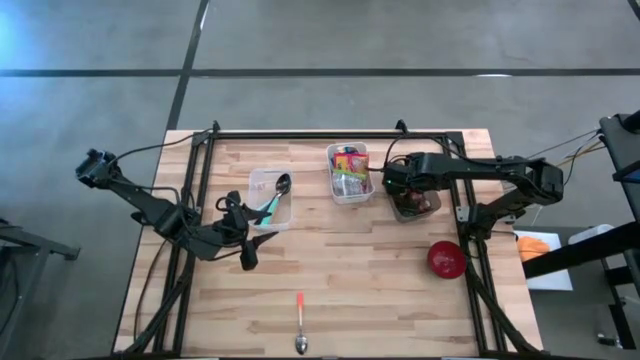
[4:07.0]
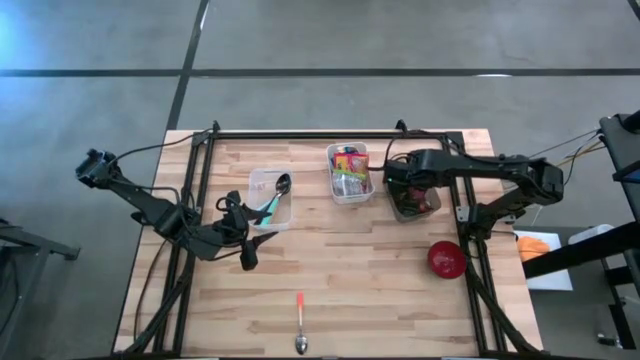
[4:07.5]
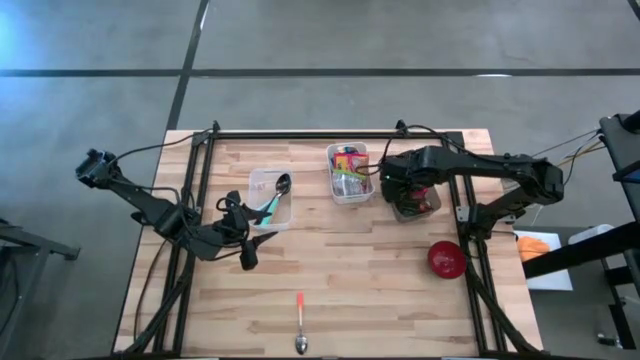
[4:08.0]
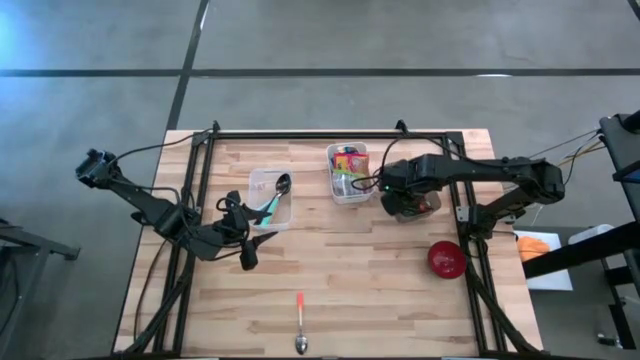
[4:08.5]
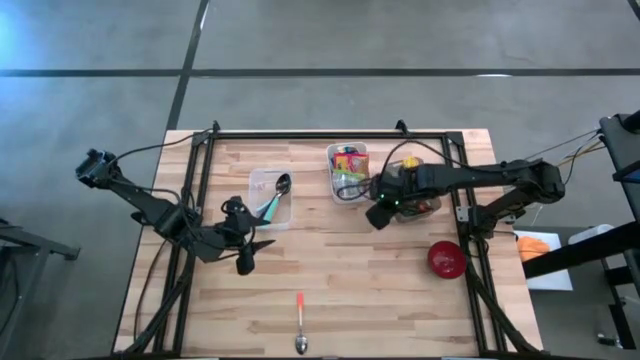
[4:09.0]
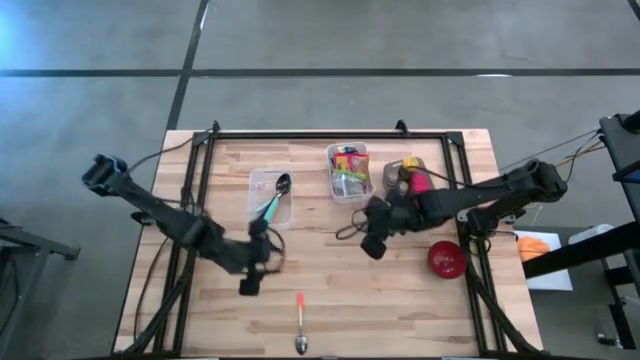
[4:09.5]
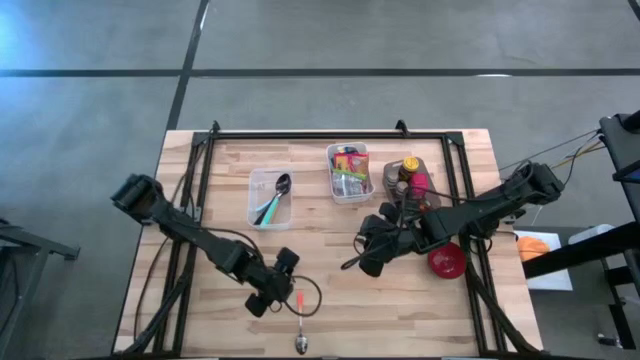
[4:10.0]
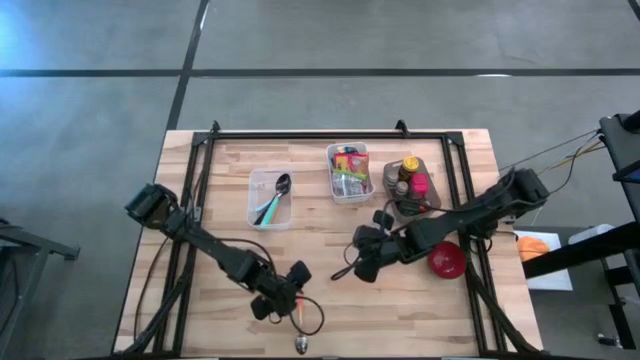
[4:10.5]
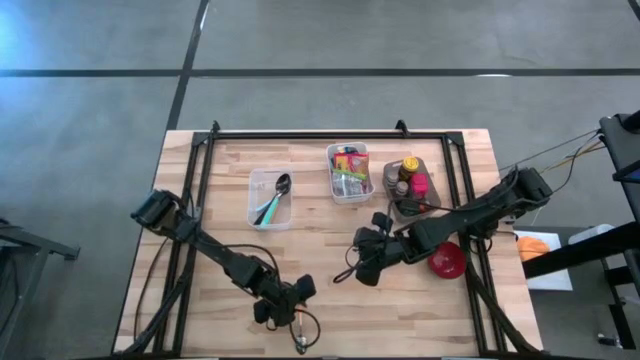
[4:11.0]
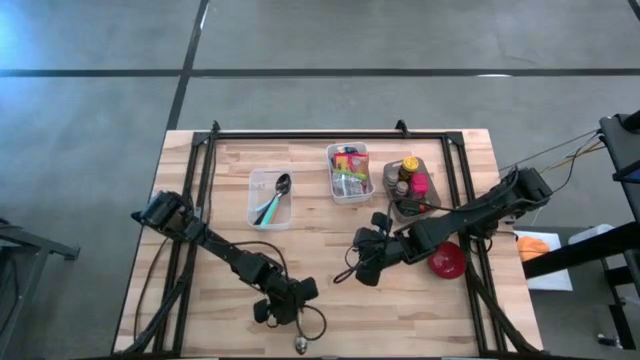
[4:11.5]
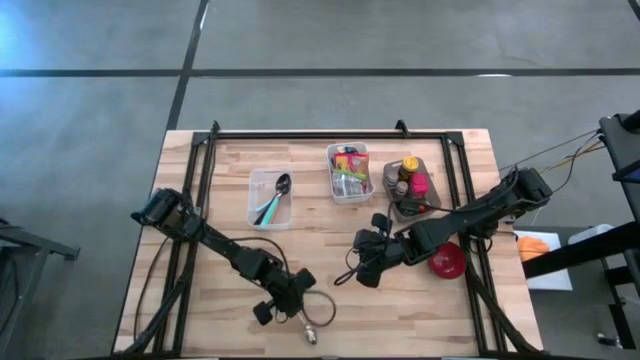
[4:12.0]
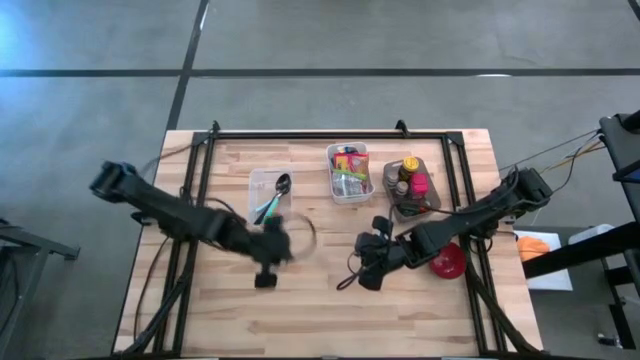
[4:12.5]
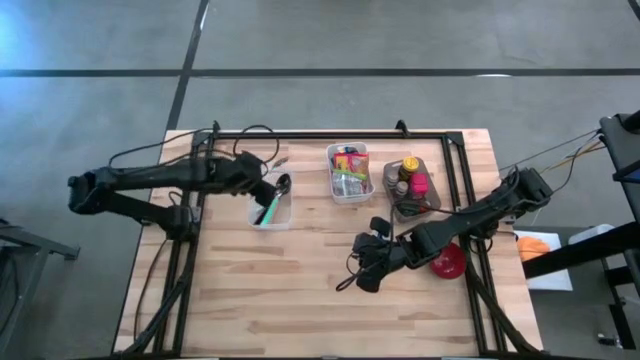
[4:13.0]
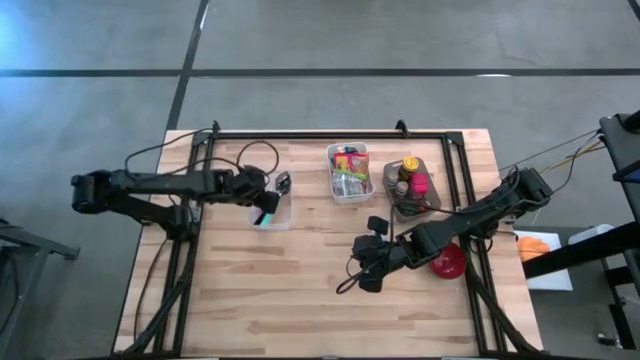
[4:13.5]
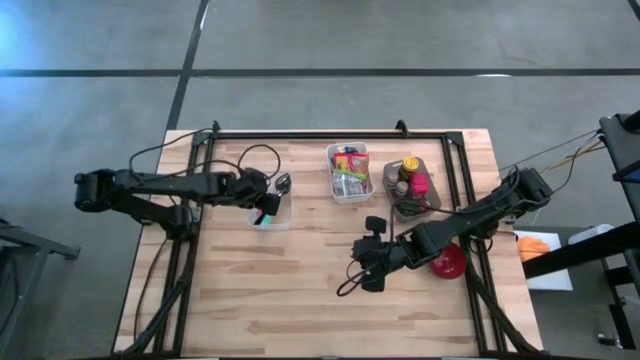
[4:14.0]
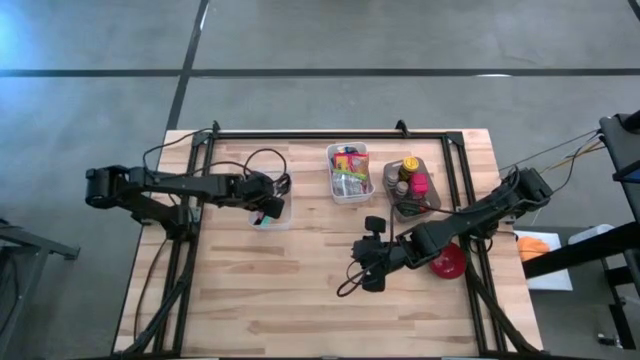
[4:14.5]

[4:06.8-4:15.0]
Put the orange spoon into the transparent bin

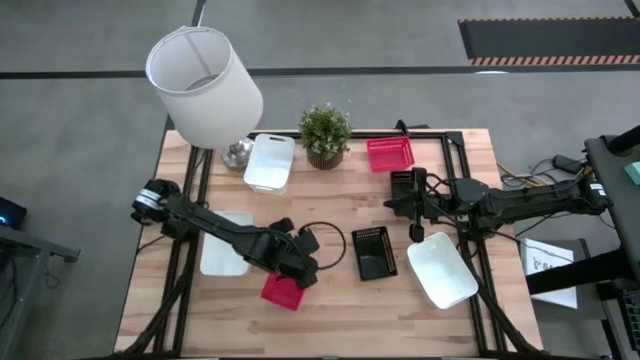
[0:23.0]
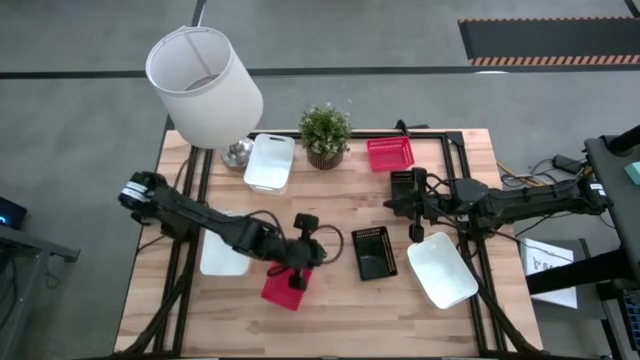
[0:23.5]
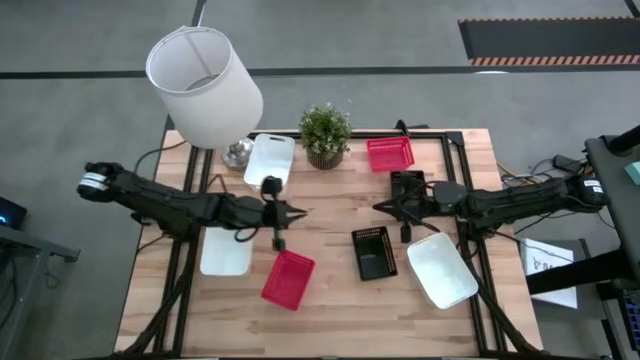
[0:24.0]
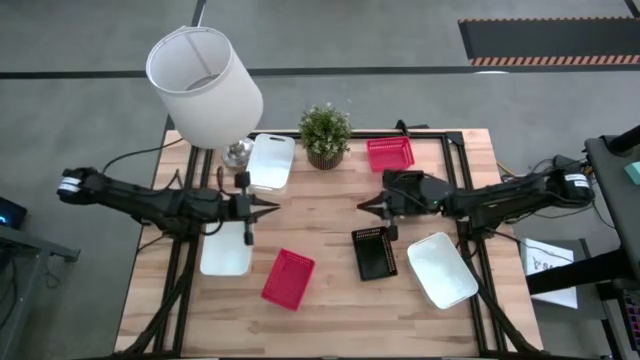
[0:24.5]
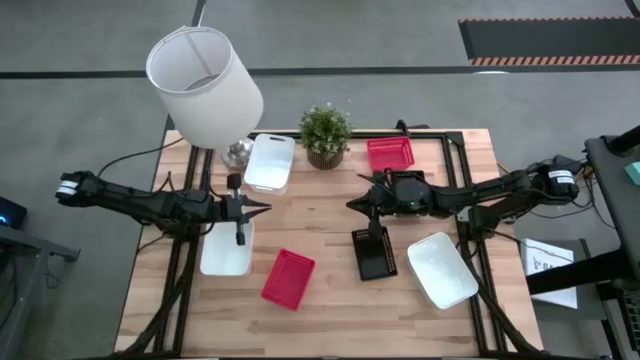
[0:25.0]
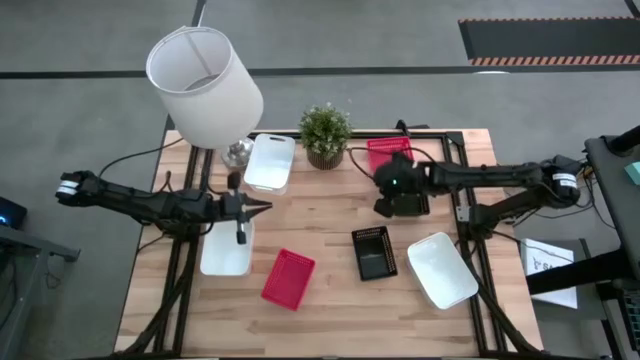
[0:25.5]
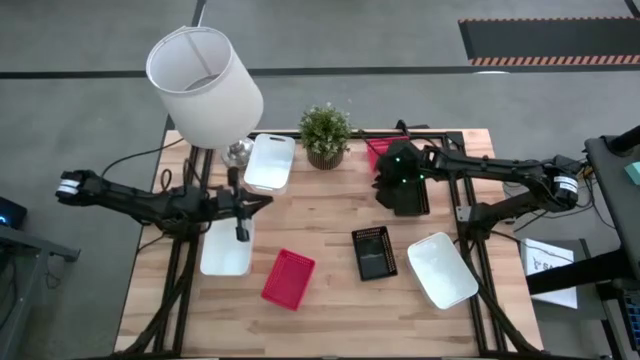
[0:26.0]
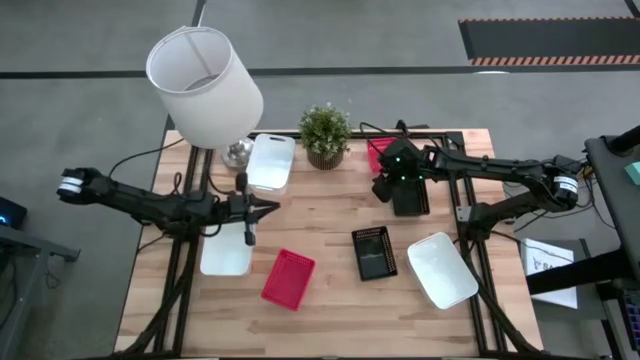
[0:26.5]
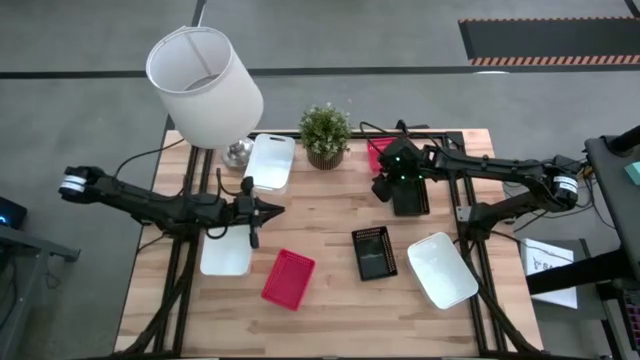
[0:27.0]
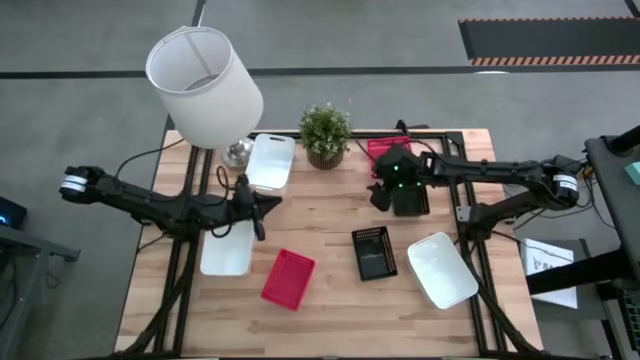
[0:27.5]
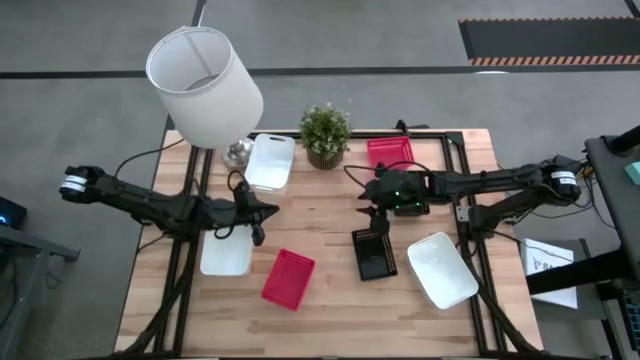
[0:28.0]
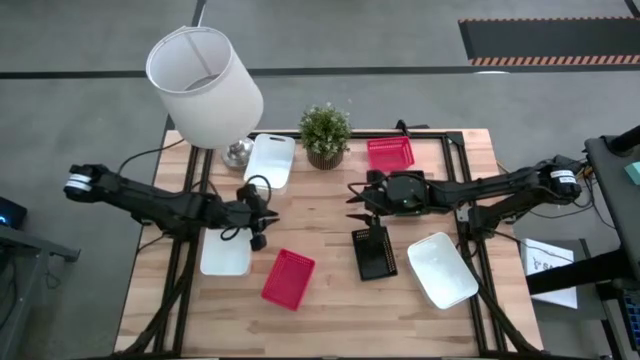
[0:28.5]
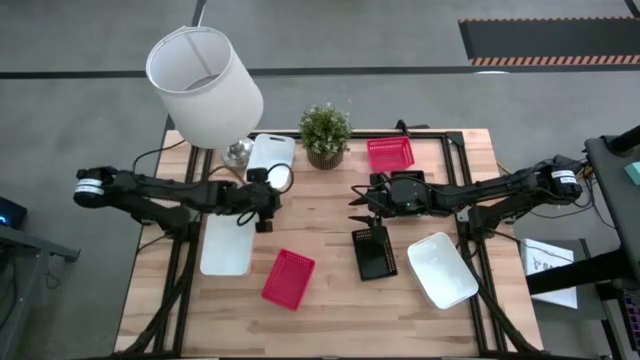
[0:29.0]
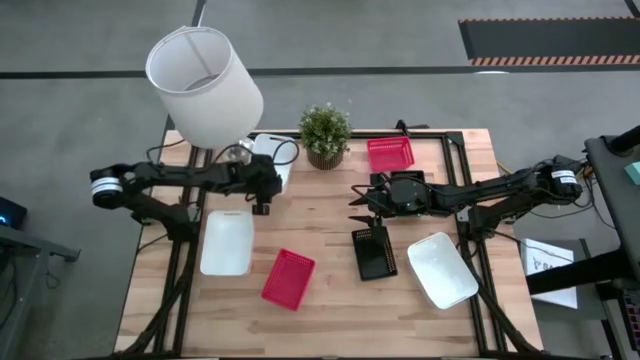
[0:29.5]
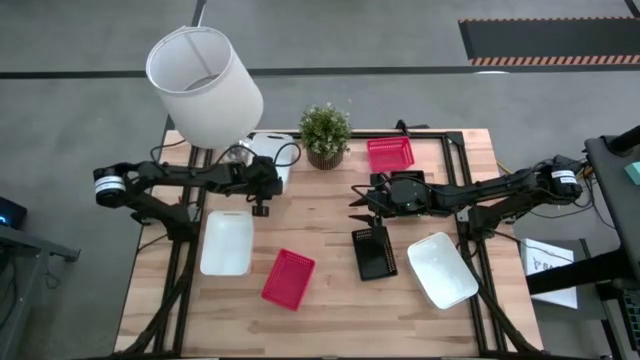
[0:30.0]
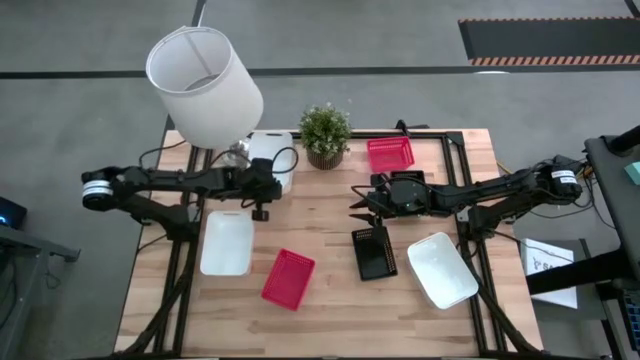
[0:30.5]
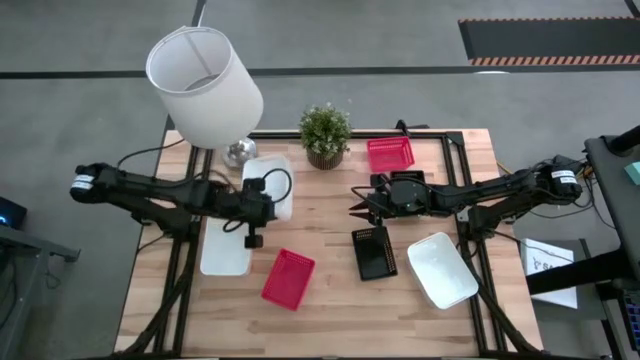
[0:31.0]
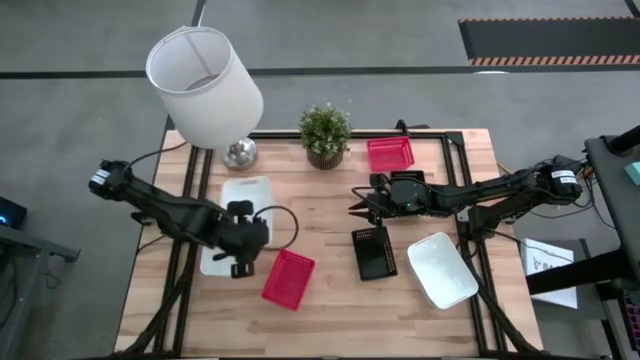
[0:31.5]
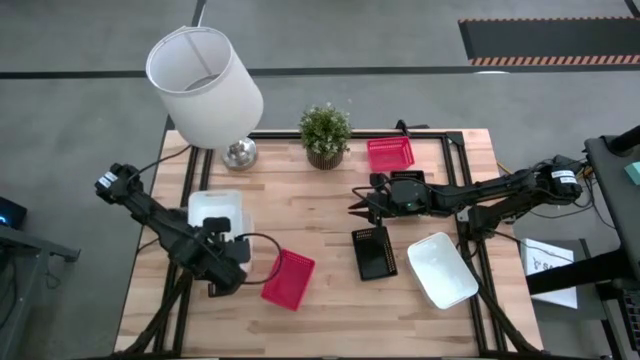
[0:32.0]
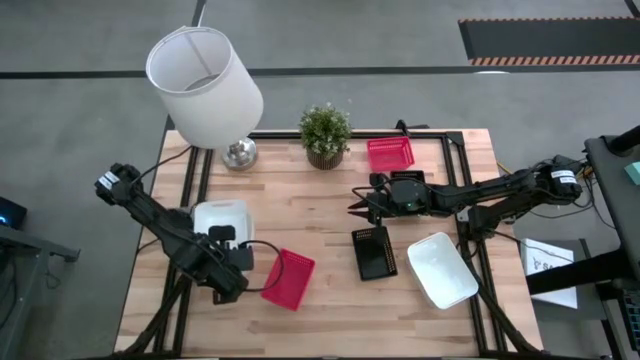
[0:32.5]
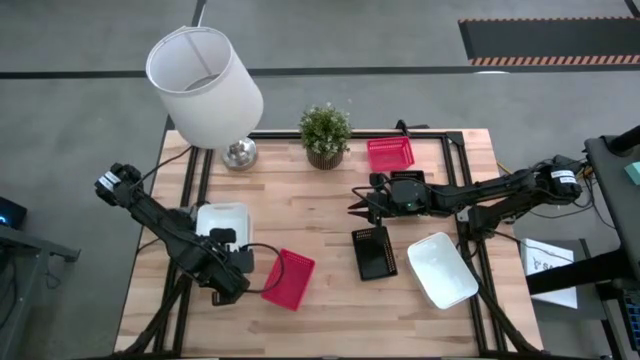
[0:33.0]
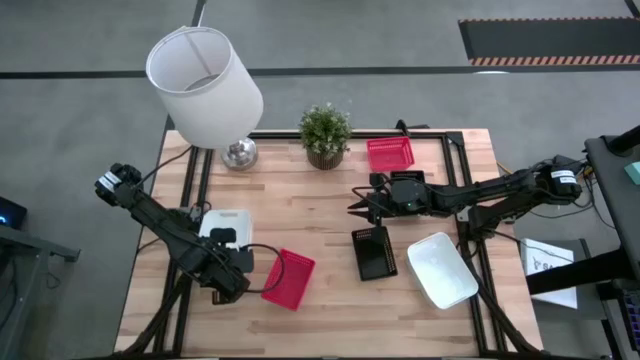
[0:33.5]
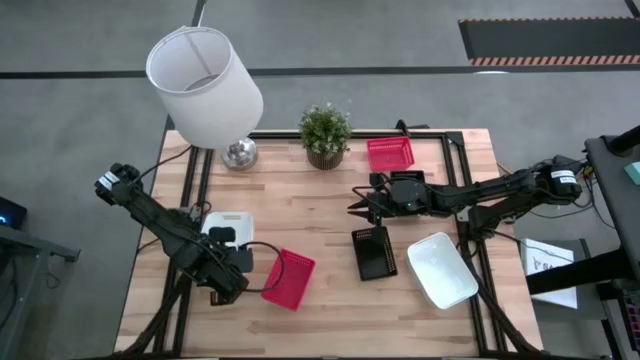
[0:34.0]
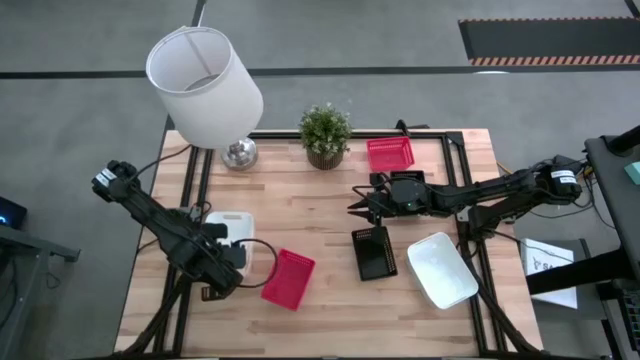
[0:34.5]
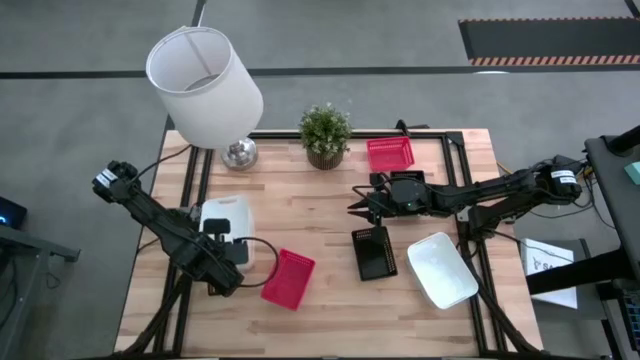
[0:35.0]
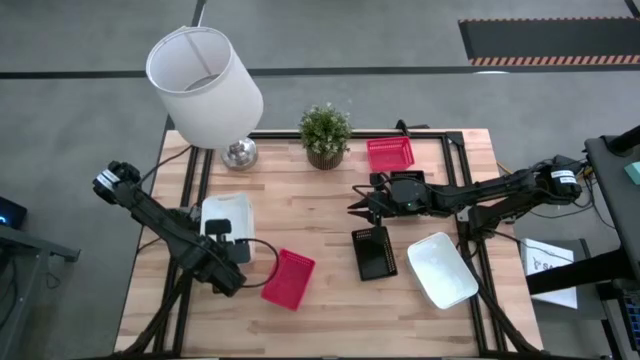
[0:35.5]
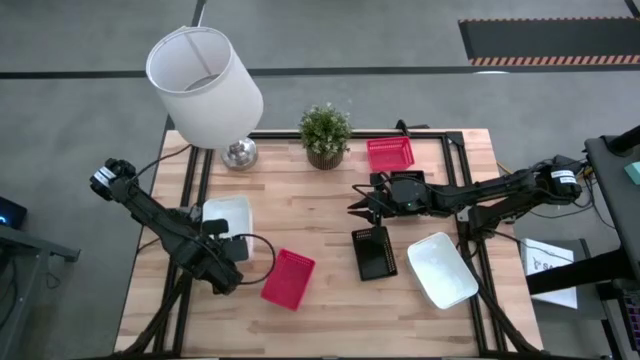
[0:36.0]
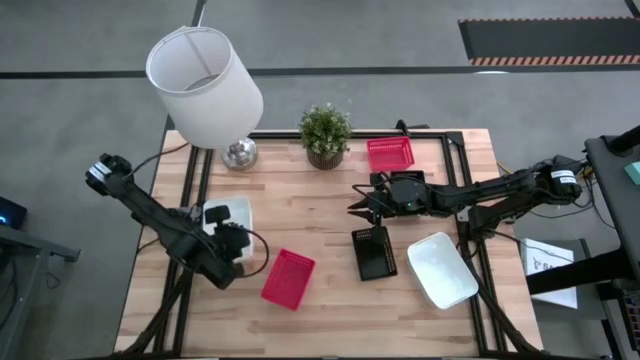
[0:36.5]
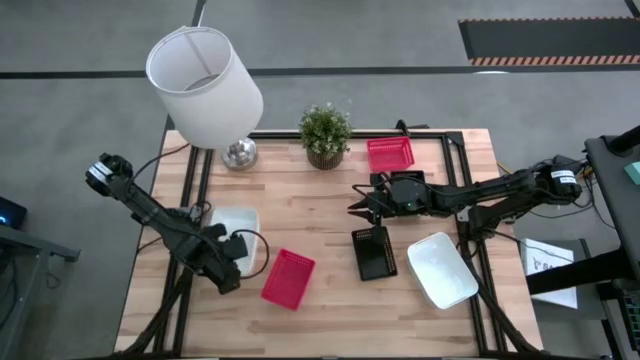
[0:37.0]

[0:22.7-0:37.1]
Stack the top white bin on the bottom left white bin
